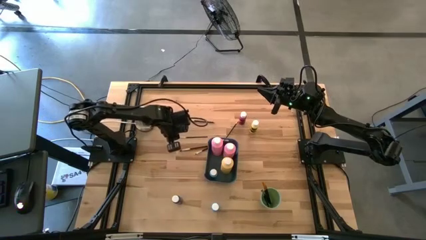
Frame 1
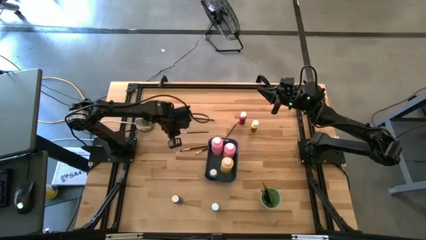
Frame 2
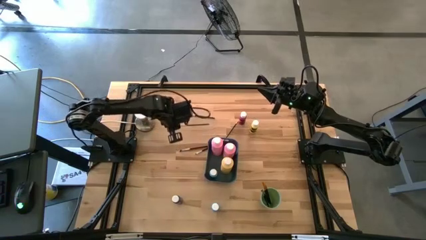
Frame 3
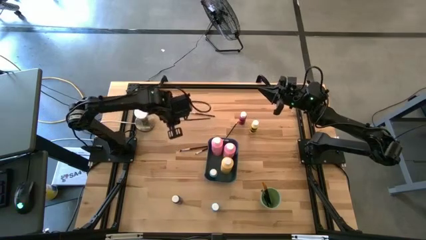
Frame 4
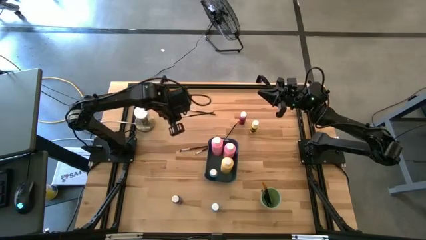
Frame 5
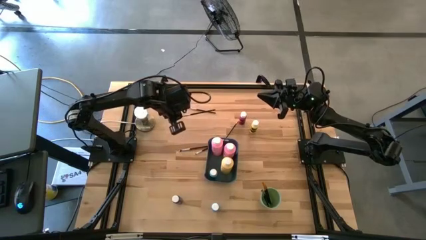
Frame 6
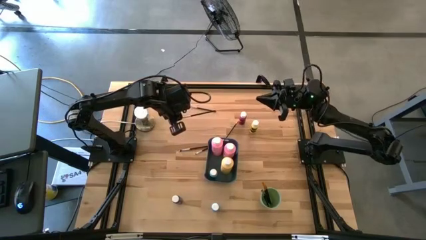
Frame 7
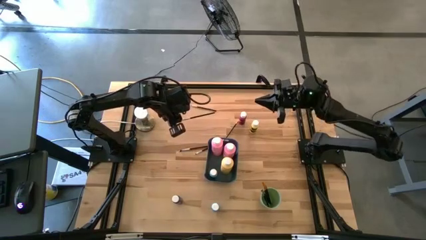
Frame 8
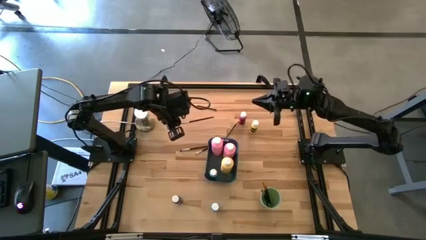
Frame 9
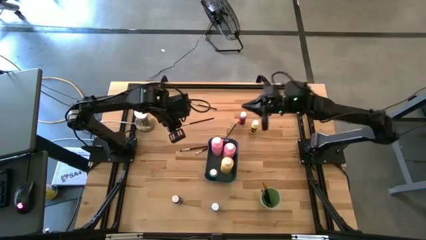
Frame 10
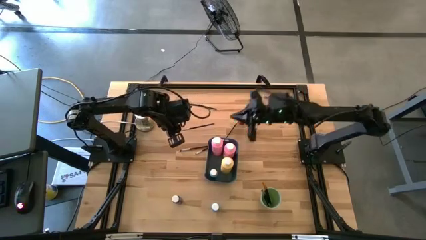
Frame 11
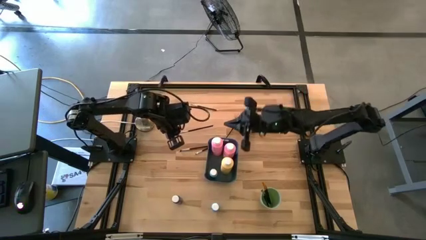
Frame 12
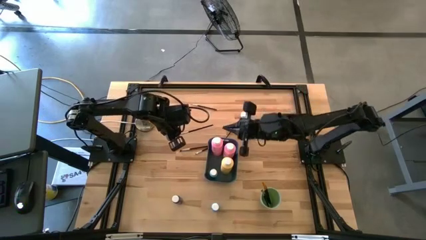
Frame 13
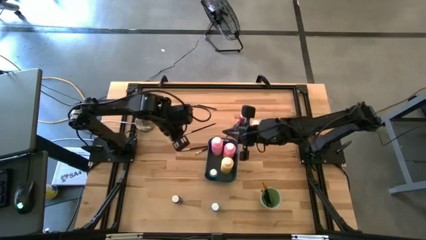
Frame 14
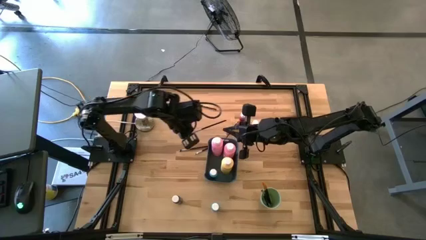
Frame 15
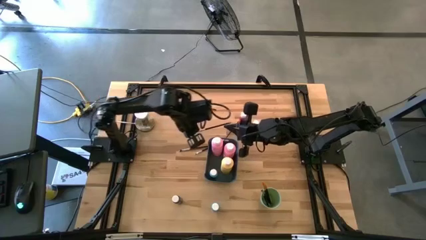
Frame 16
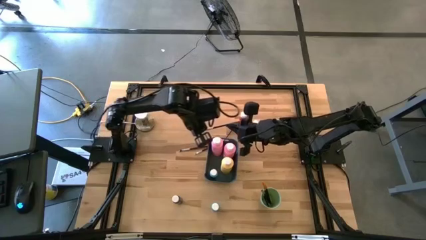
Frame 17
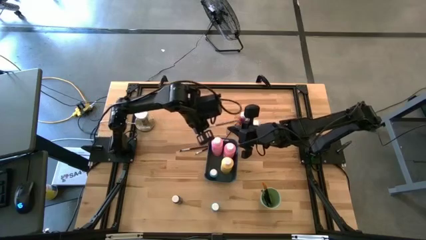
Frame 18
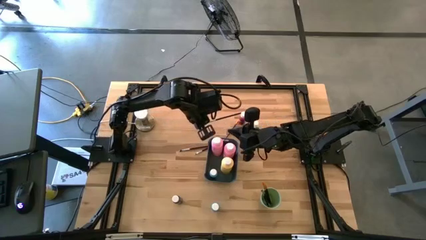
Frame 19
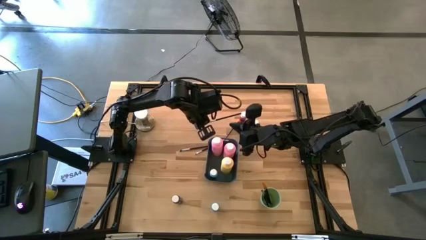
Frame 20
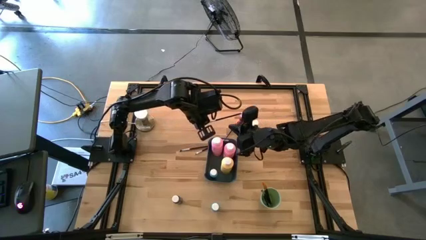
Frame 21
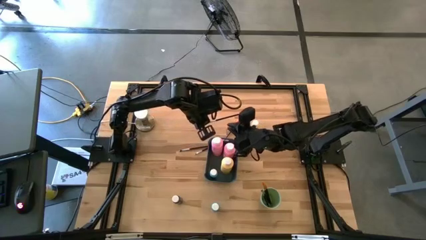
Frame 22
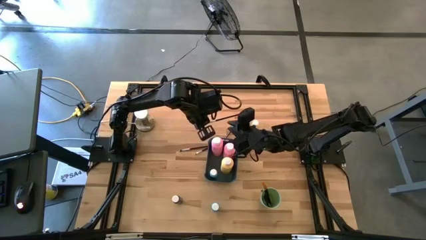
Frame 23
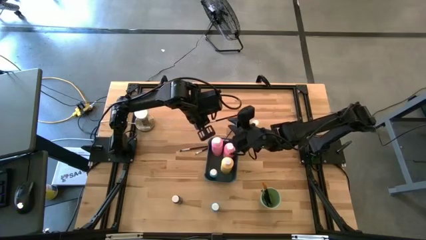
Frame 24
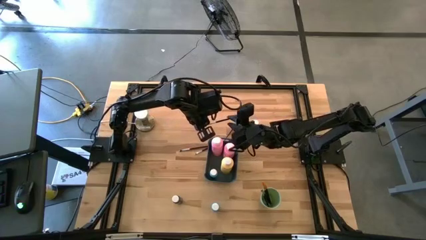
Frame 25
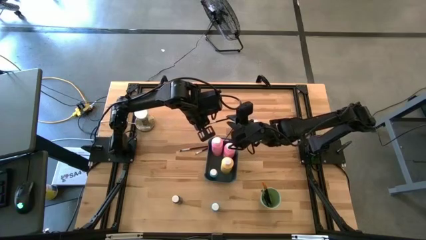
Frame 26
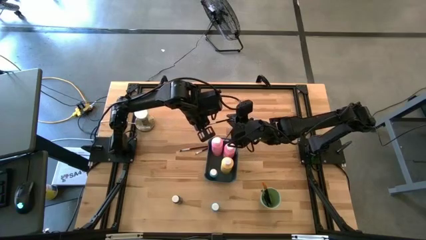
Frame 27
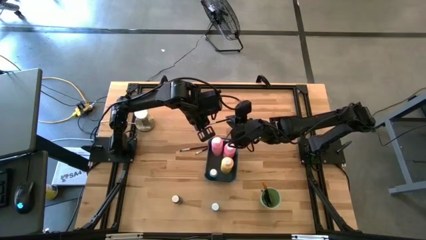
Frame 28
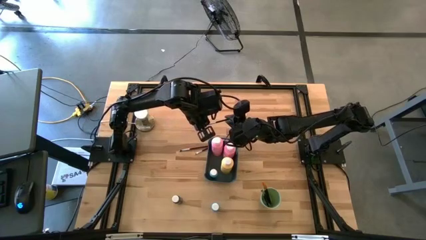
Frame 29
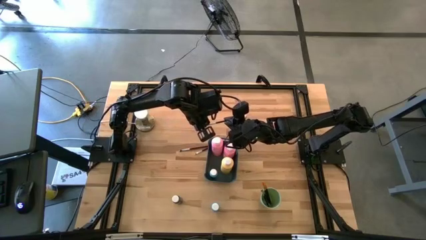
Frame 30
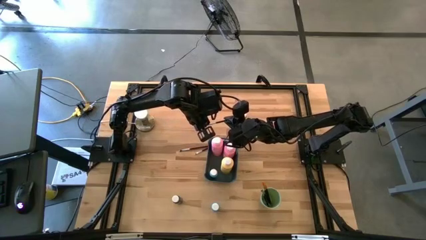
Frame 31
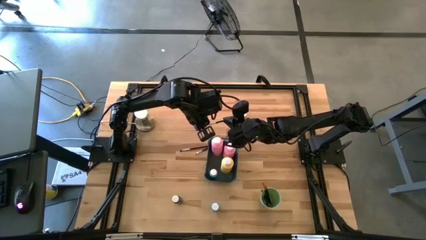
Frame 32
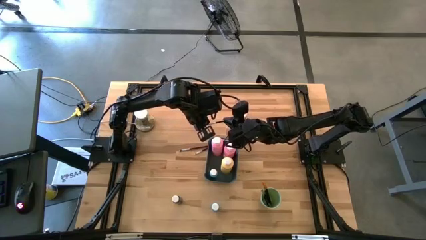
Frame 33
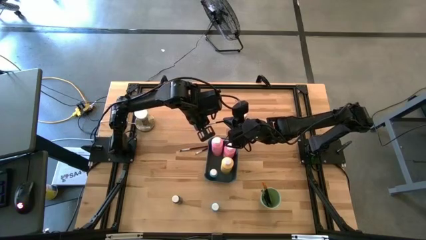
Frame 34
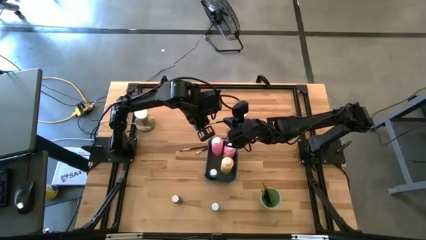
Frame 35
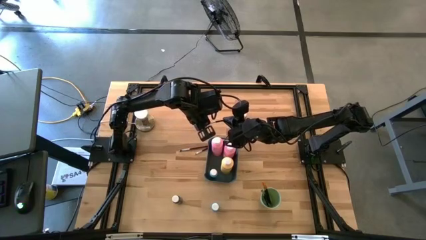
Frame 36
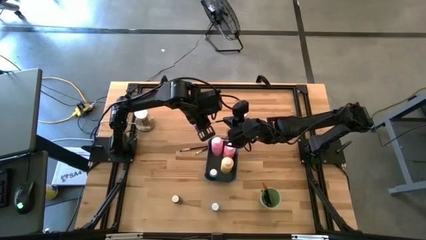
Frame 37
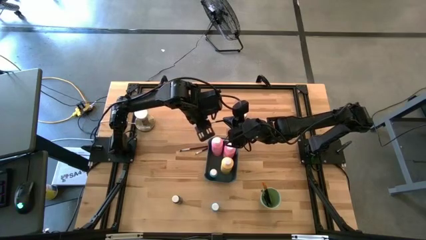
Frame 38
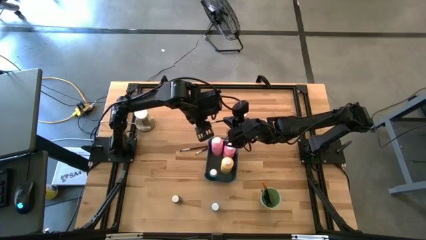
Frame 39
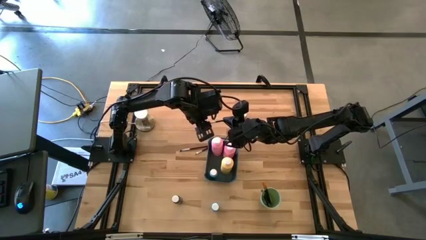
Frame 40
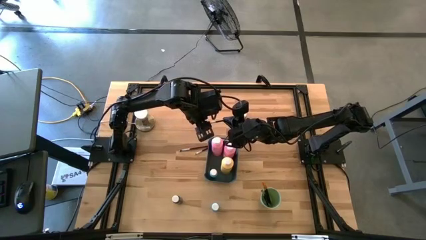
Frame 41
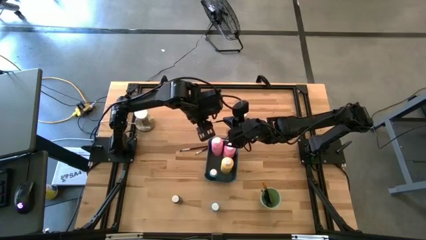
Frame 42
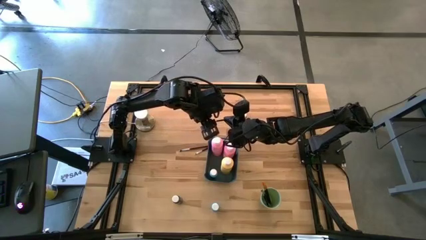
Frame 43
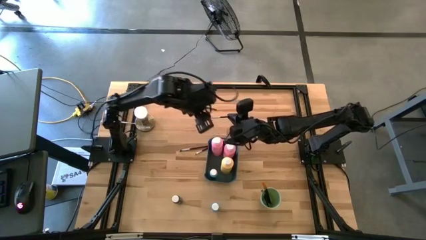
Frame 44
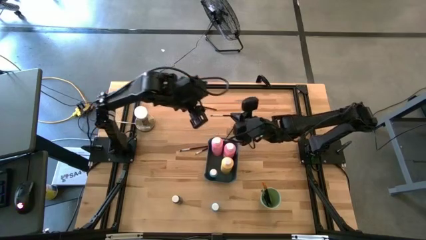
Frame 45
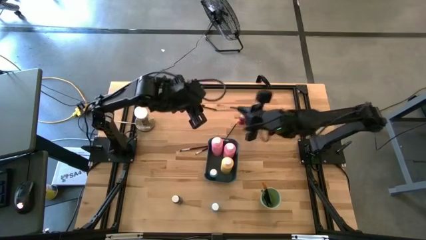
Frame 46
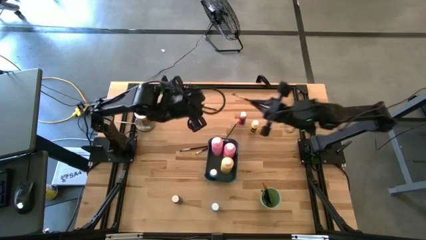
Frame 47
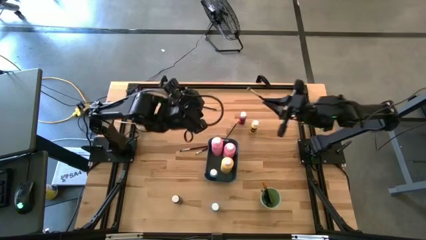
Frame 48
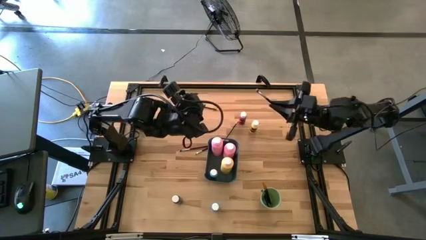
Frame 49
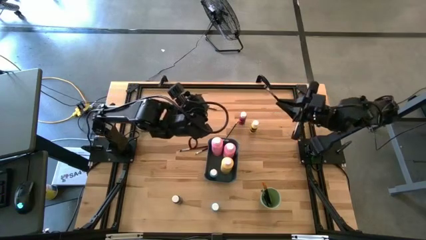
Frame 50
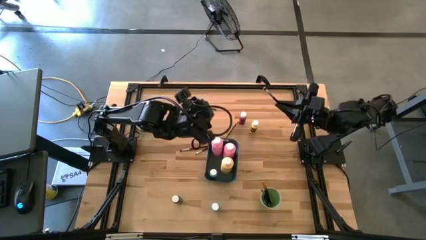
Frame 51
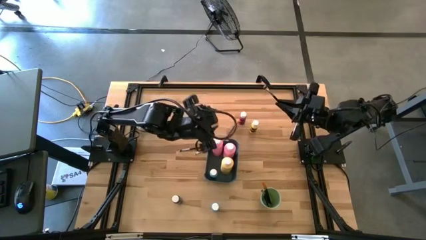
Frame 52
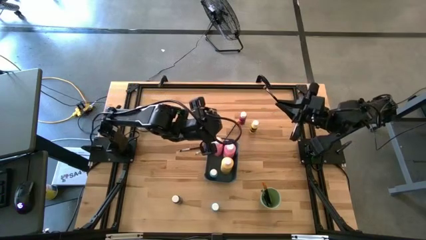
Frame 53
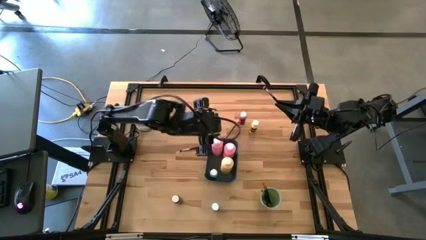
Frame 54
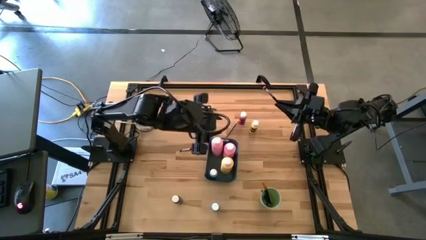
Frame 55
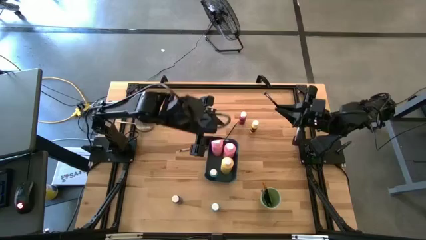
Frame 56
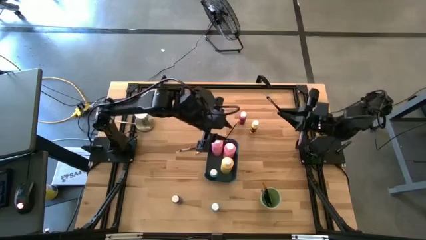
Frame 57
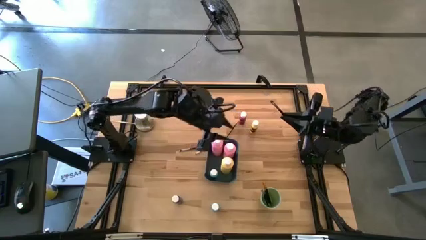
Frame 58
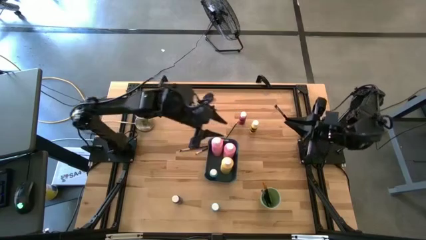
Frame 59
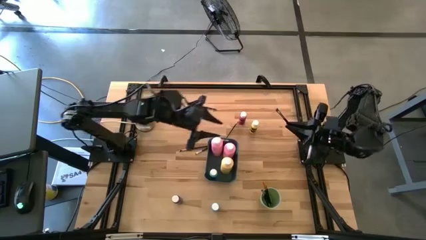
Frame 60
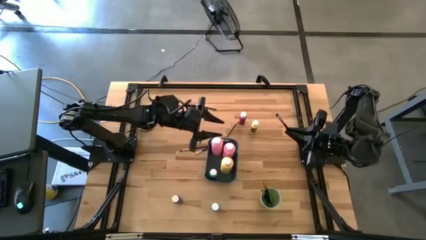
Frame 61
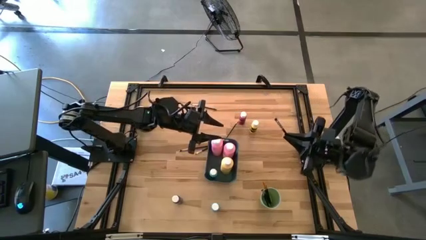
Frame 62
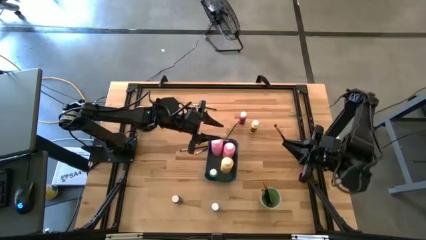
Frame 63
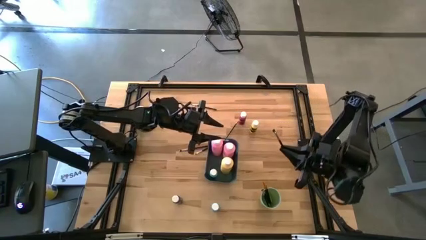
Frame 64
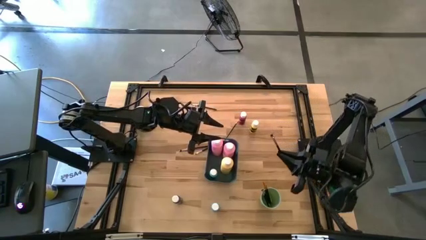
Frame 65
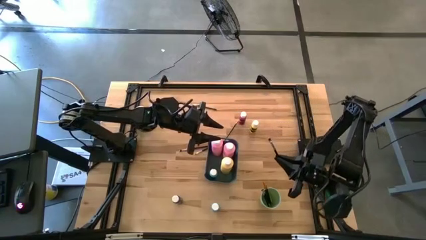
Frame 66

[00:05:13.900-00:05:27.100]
Task: Pick & Place Paint Supplies
Put the black and silver paint brush into the green cup

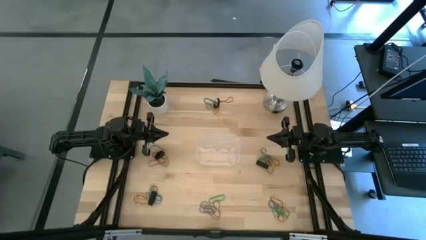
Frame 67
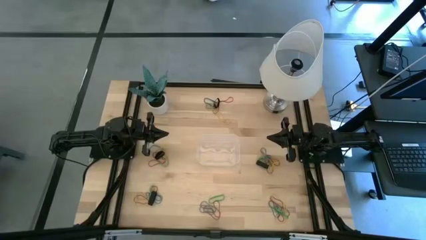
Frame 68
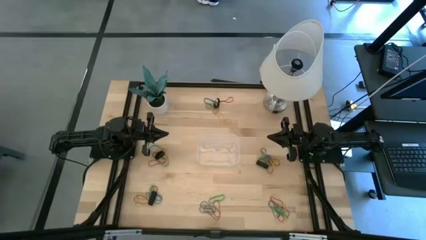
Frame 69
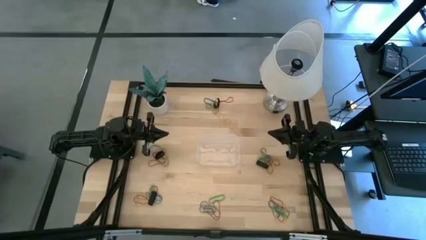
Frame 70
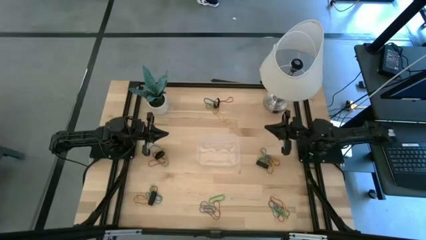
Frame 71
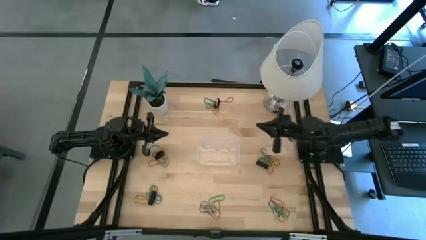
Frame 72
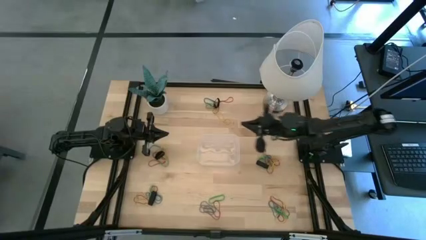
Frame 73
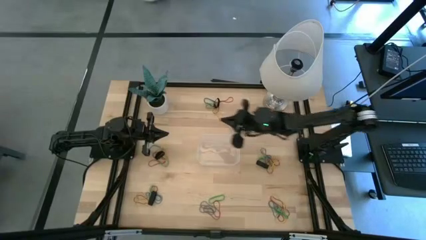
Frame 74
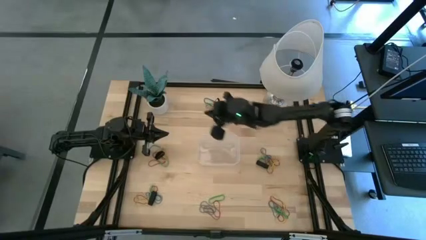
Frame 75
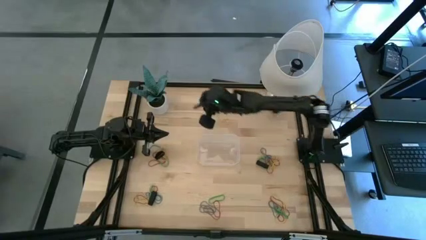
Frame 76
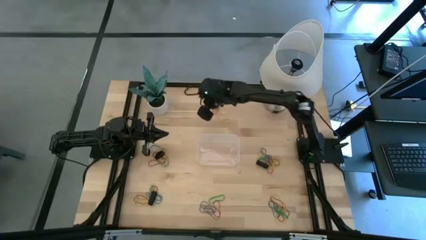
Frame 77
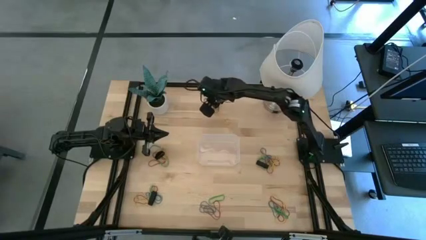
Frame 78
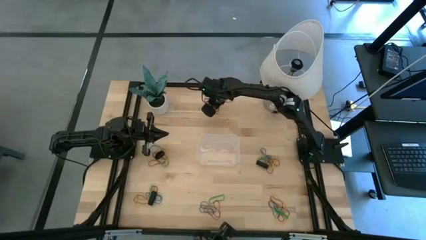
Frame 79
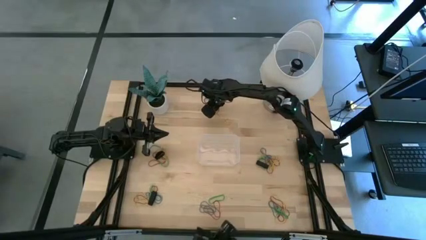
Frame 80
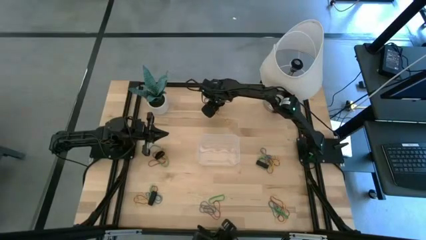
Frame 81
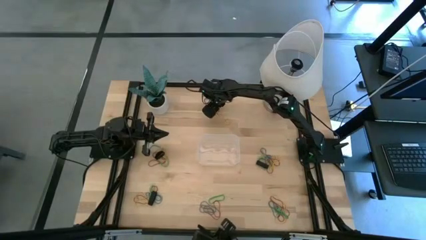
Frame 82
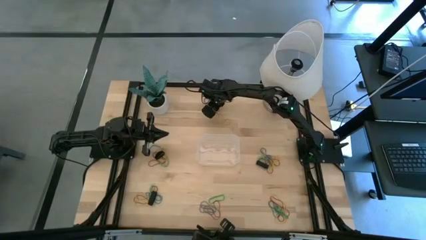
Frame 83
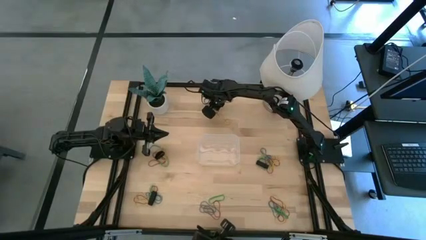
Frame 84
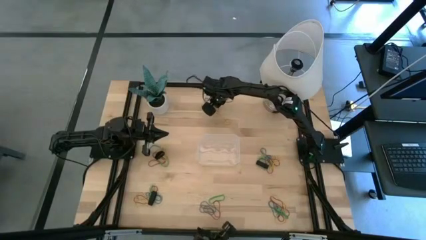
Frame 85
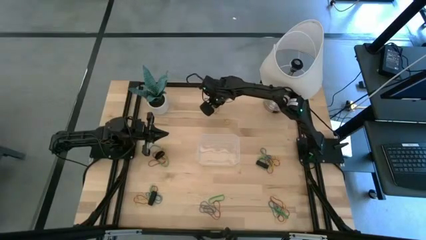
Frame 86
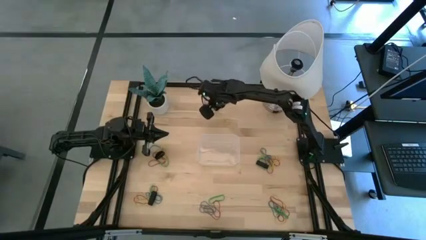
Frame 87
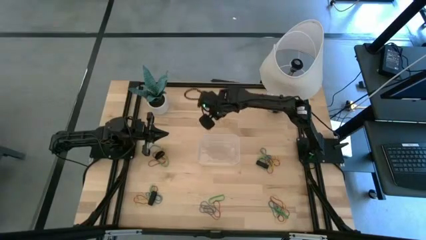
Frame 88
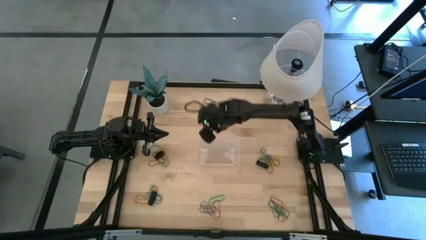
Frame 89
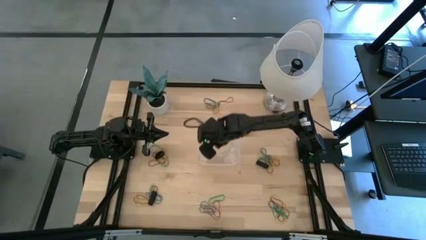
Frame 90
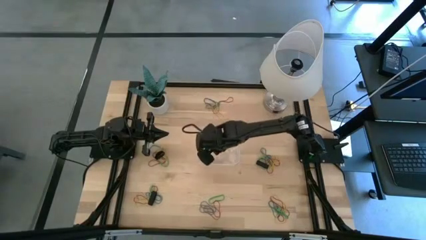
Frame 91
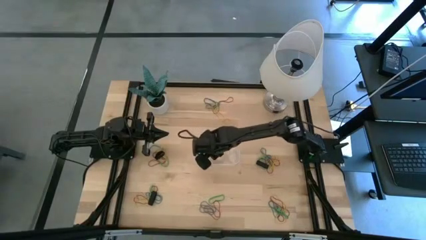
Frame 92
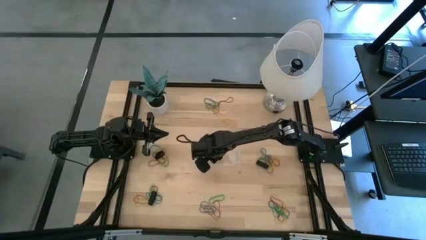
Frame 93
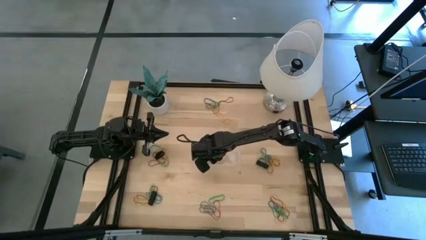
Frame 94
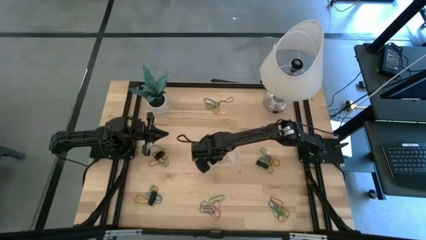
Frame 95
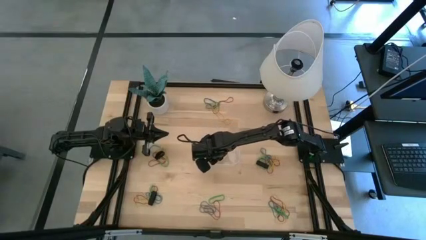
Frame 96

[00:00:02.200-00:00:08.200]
Task: Pick and place rubber bands into bin
Put the black rubber band into the transparent bin
